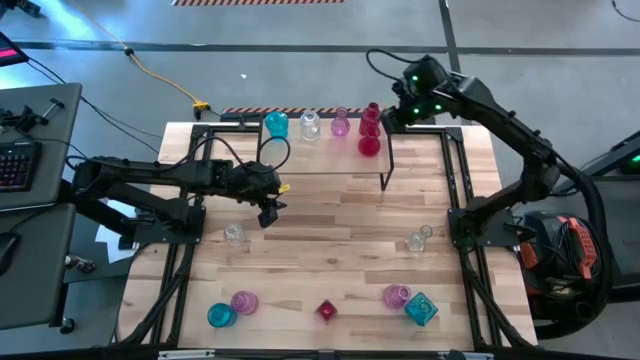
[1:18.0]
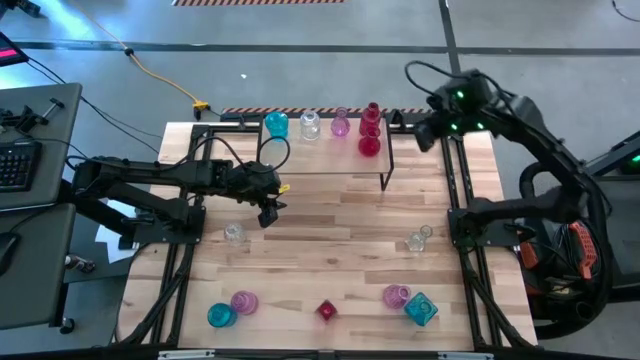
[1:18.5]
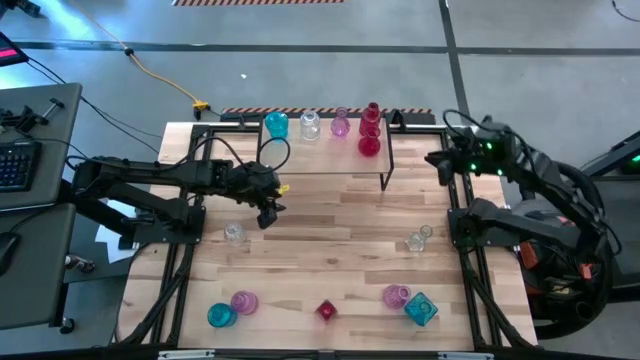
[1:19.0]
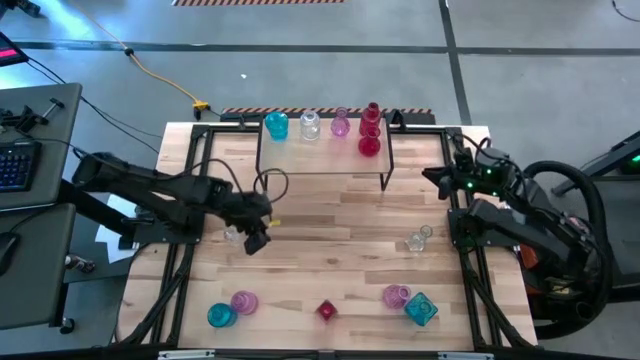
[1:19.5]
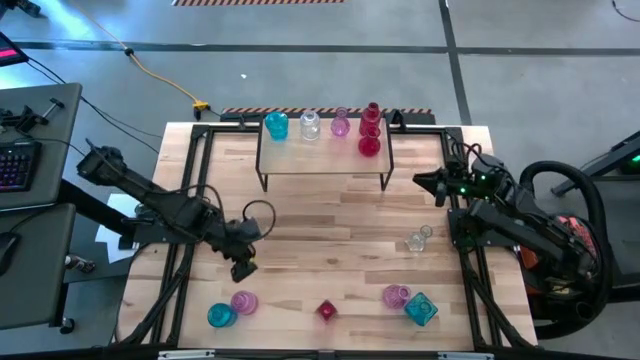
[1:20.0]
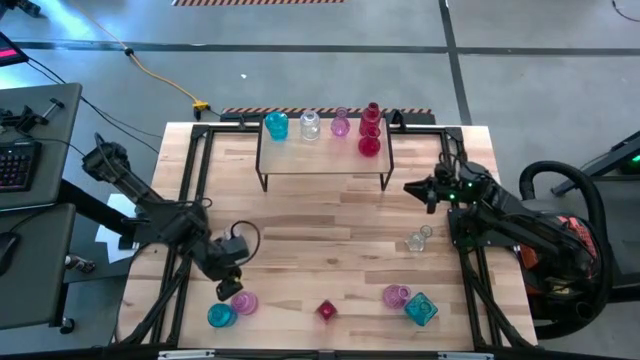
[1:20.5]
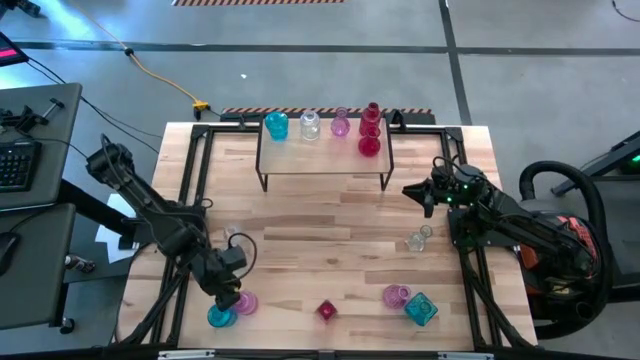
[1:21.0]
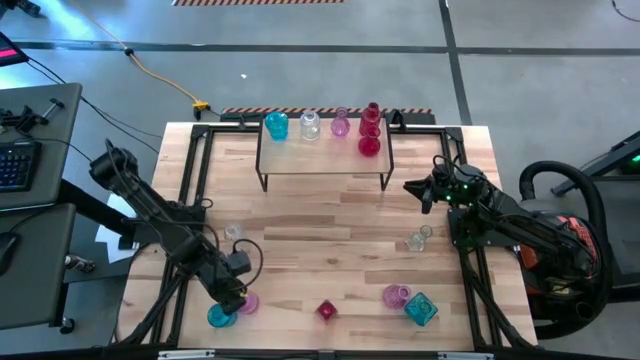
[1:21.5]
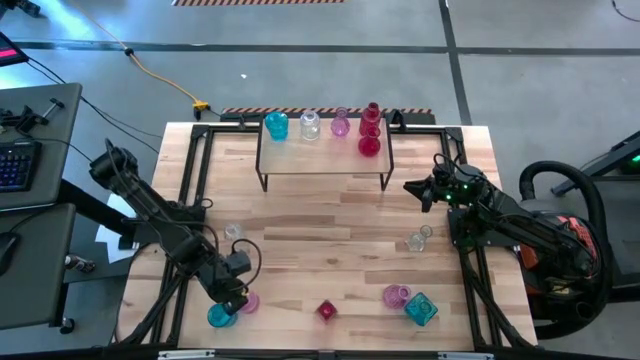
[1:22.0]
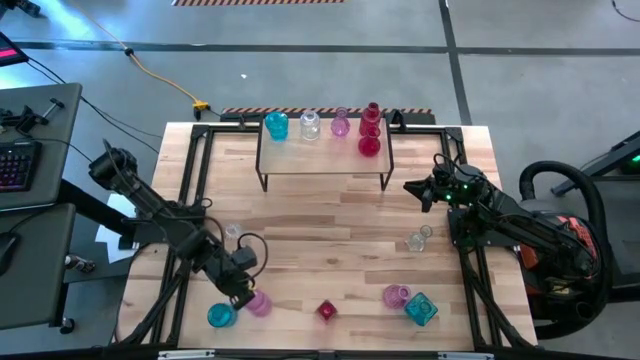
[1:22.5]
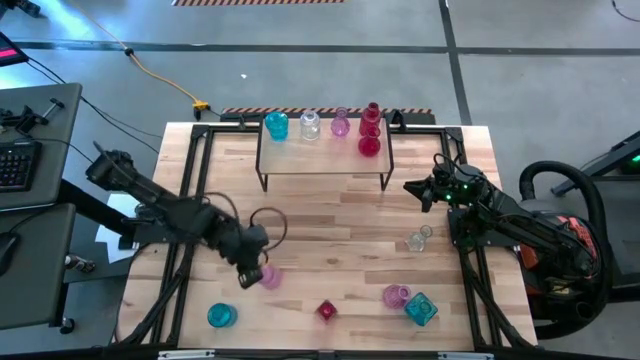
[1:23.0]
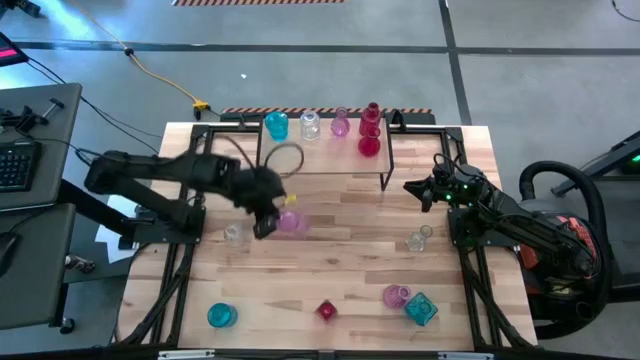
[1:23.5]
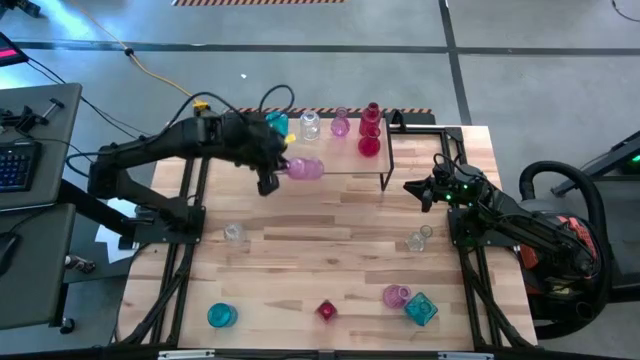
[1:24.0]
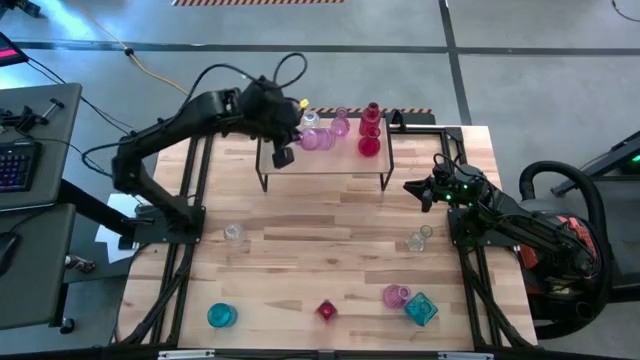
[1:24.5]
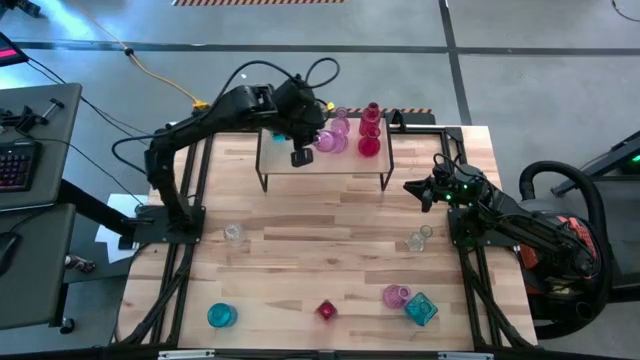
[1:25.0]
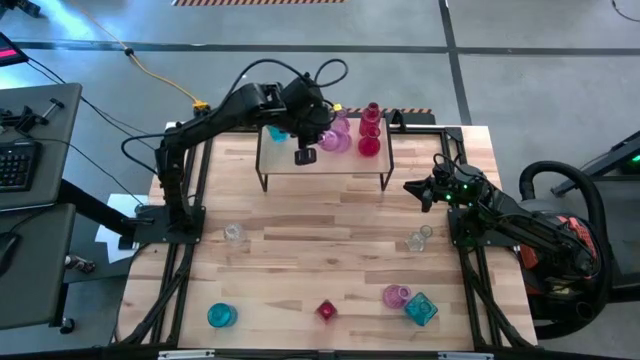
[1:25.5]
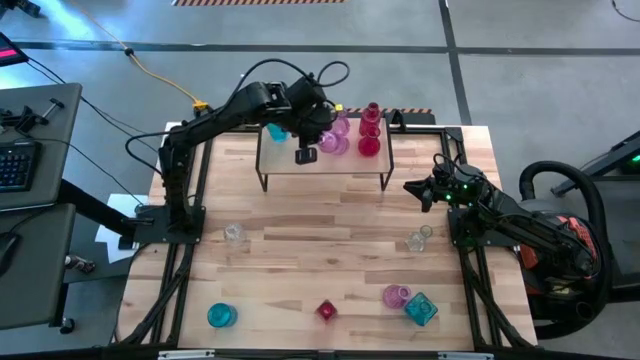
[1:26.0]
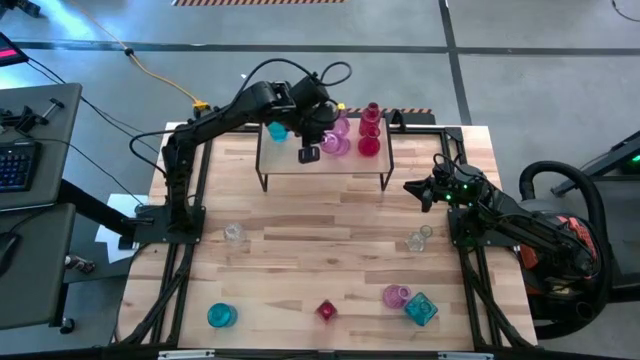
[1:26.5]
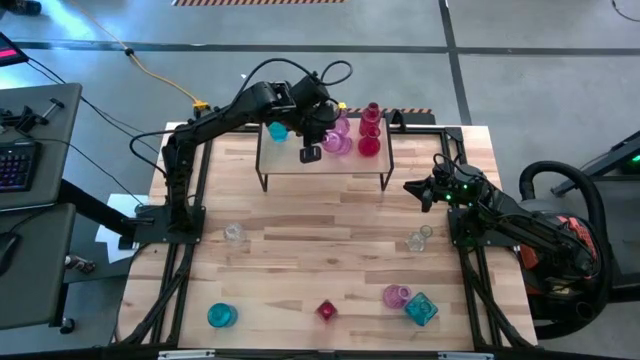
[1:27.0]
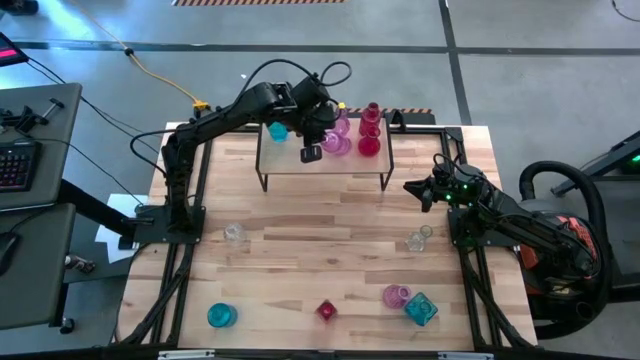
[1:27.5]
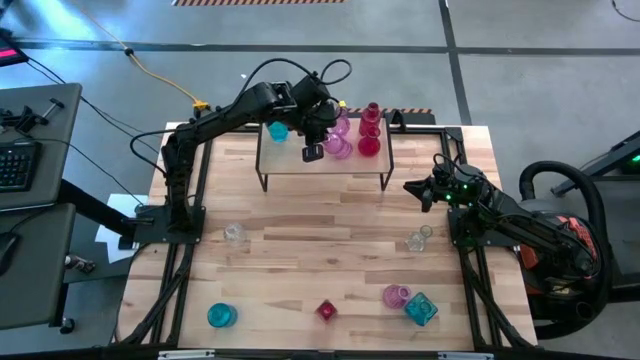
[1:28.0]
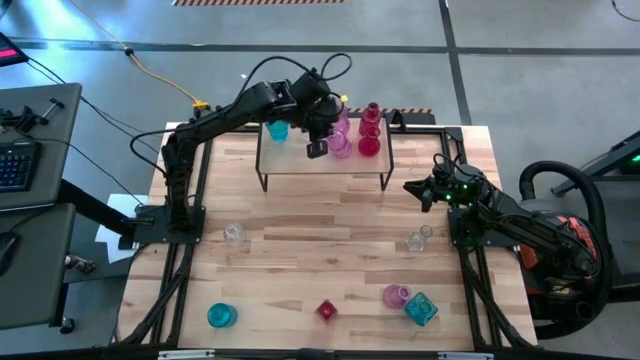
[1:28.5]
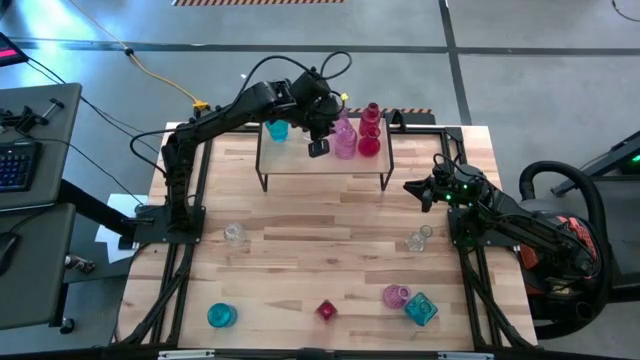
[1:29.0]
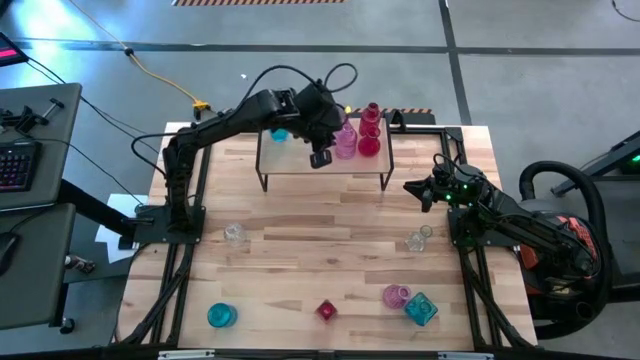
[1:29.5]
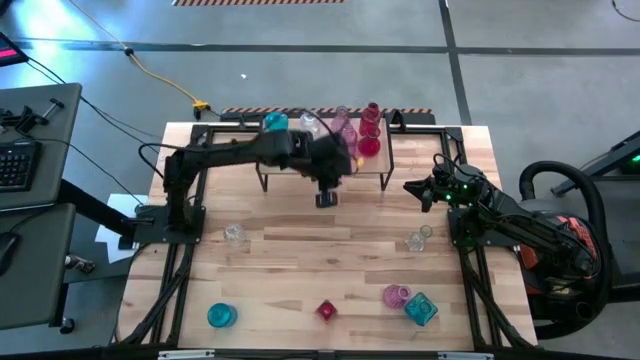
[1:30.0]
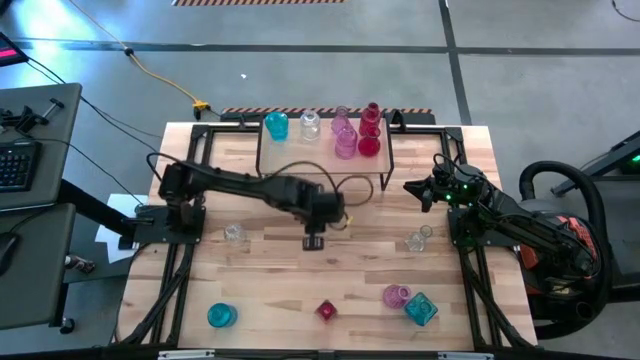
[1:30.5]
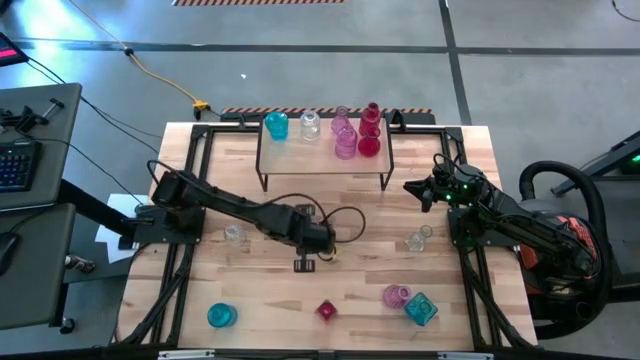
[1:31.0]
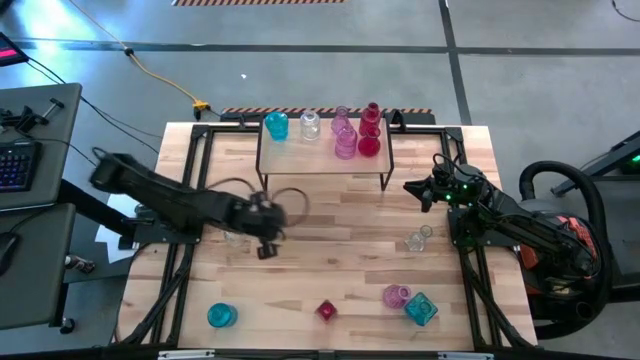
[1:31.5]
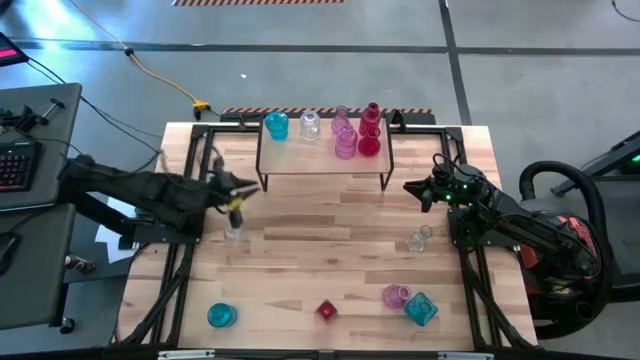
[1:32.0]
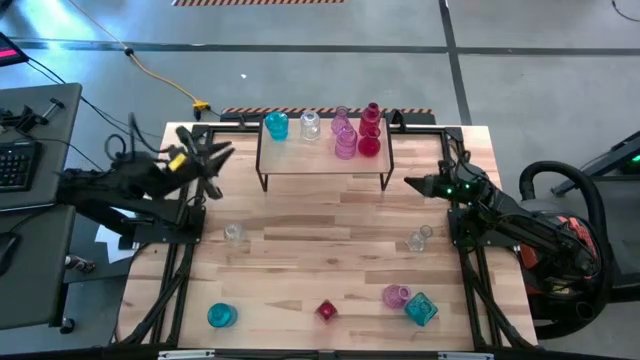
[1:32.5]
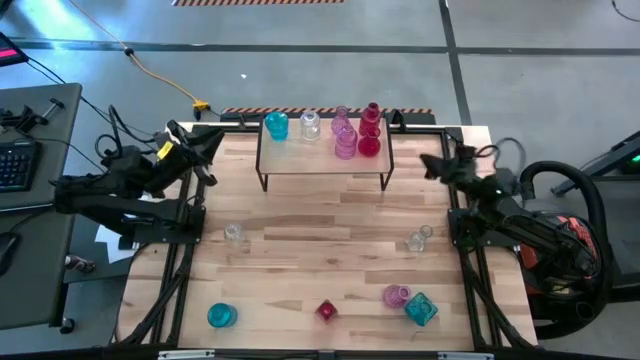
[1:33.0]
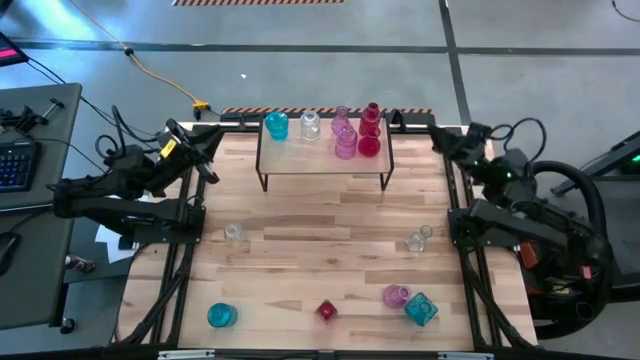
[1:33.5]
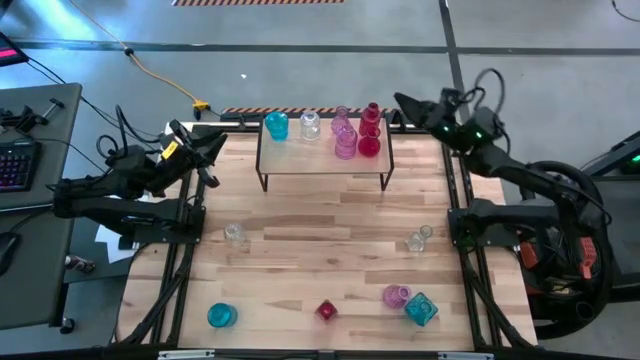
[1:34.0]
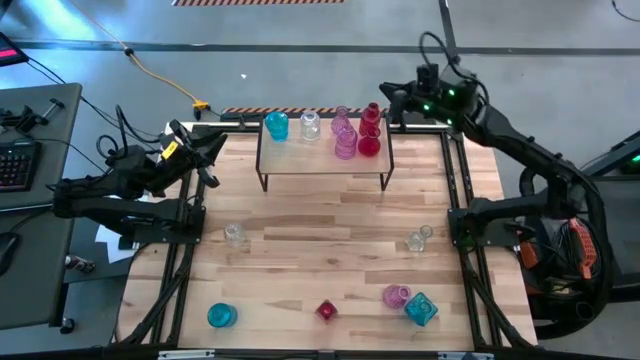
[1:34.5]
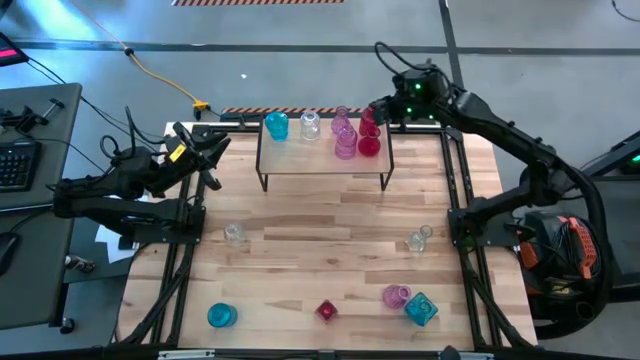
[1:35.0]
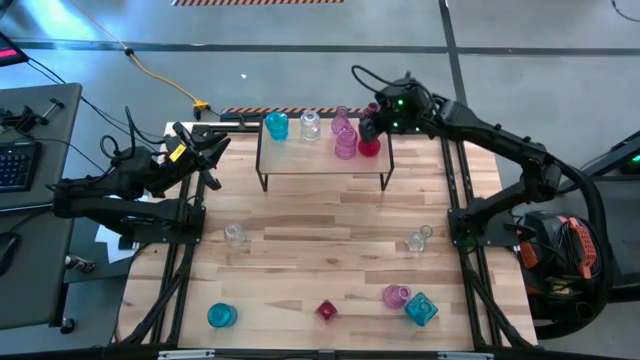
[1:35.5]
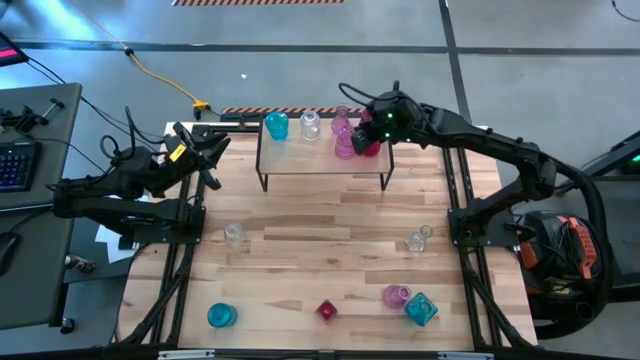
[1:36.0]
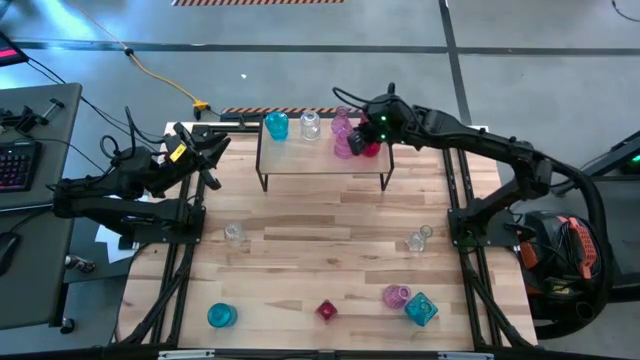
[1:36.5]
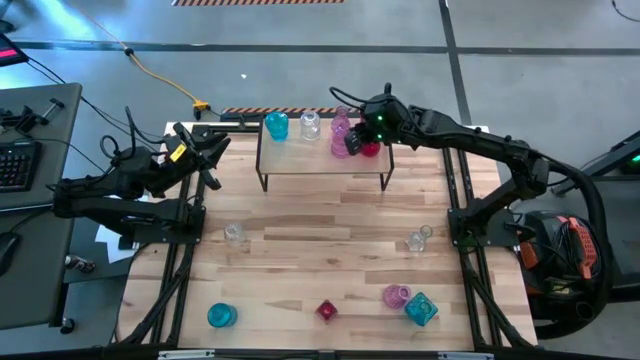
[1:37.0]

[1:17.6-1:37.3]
Task: sort vases onto shelf
Put the left violet vase on the shelf aligned with the other violet vase

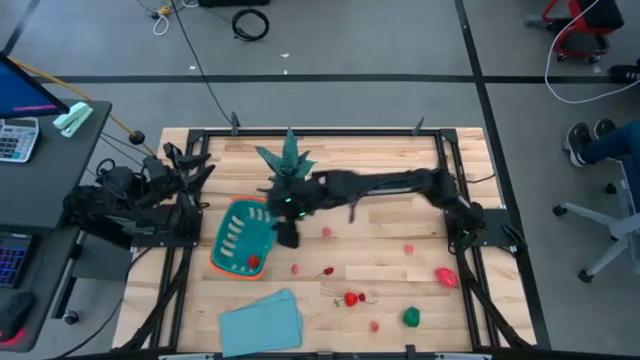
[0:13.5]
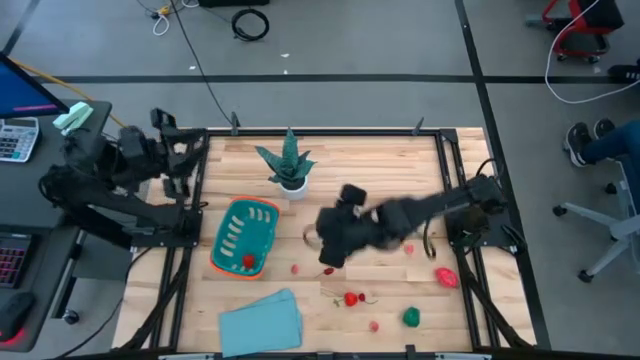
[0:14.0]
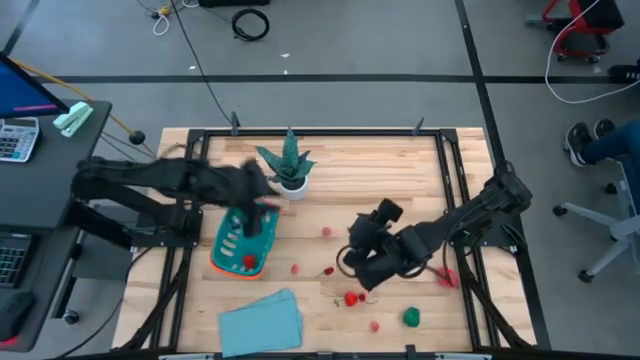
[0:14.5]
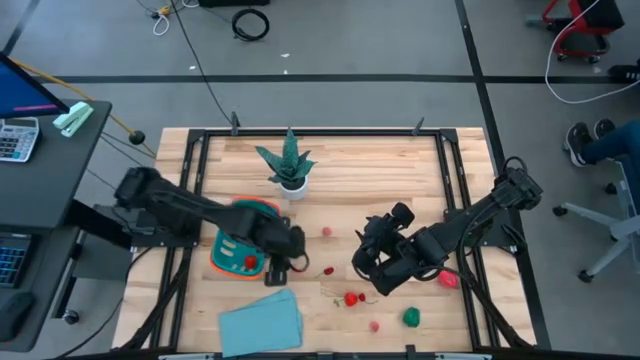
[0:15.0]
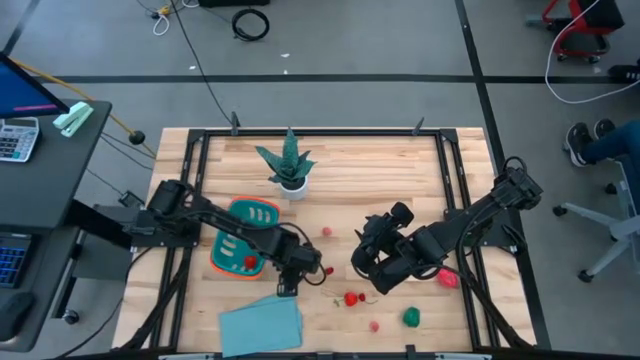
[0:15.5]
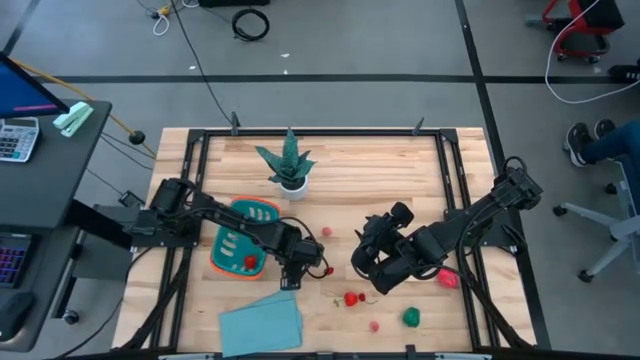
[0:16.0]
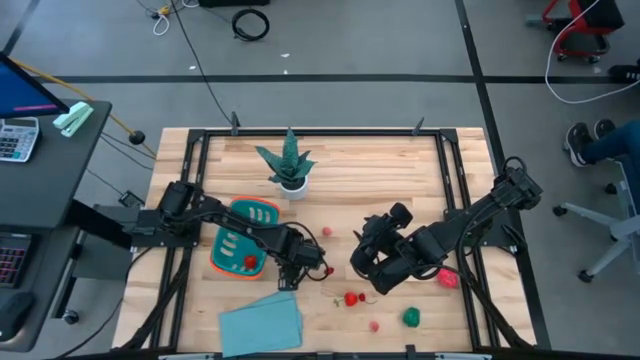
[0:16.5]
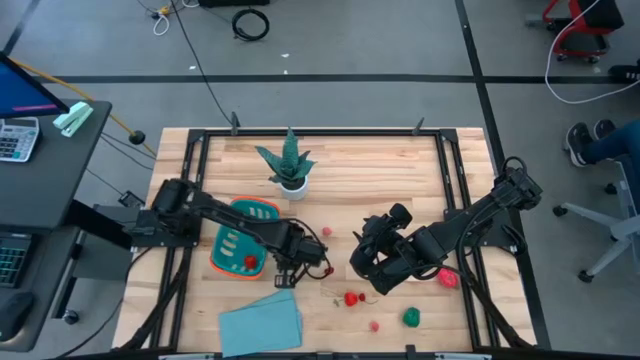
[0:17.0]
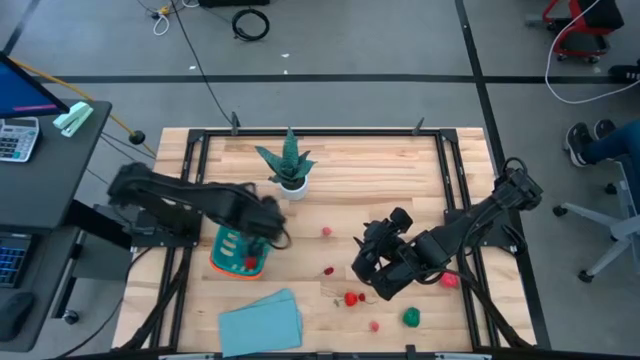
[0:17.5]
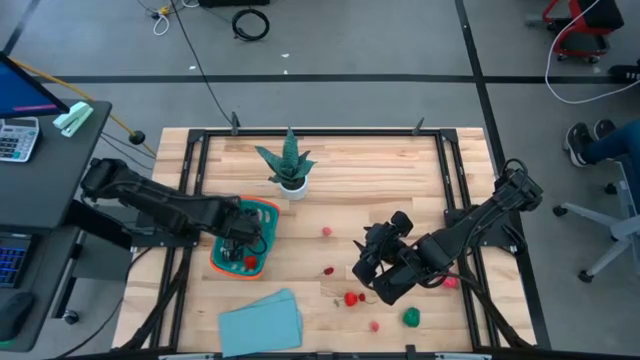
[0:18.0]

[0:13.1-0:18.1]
Task: Pick and placing Produce into tupperware
Put the pink peach into the blue basket
